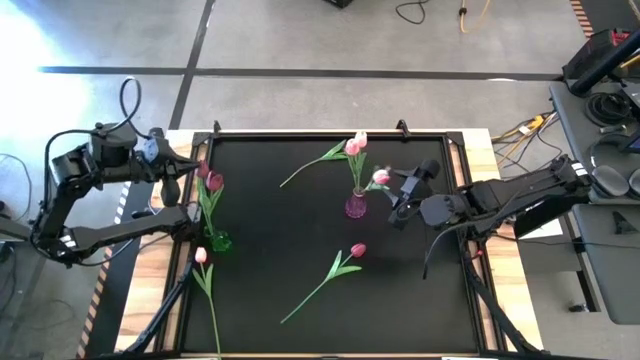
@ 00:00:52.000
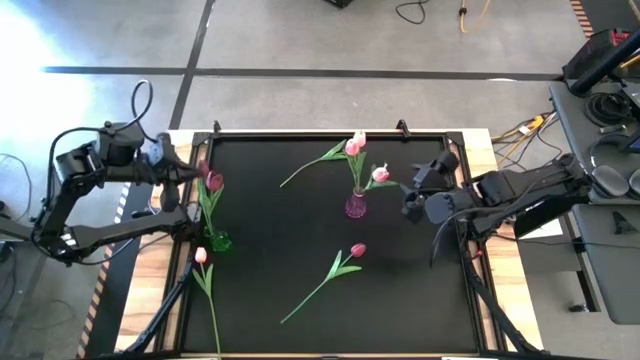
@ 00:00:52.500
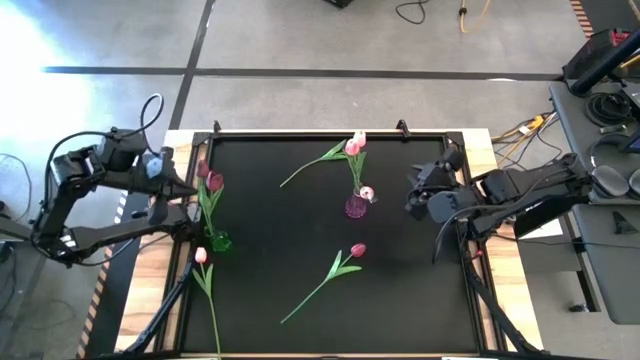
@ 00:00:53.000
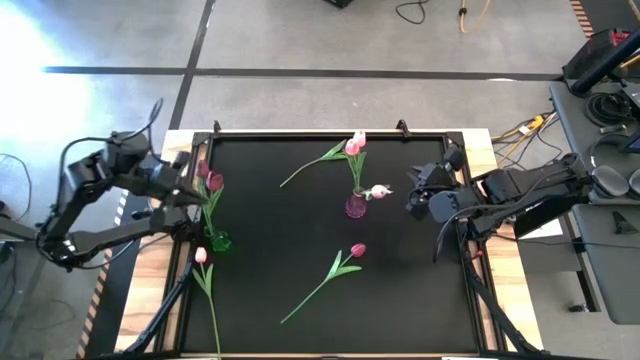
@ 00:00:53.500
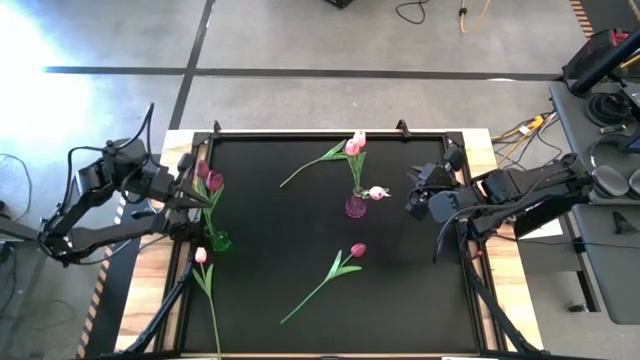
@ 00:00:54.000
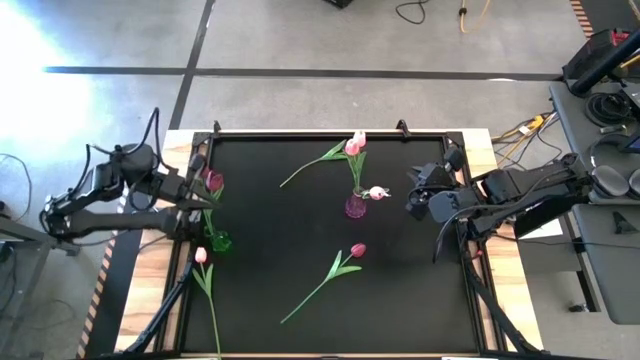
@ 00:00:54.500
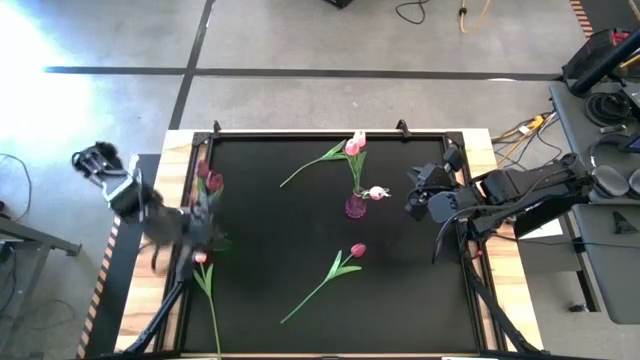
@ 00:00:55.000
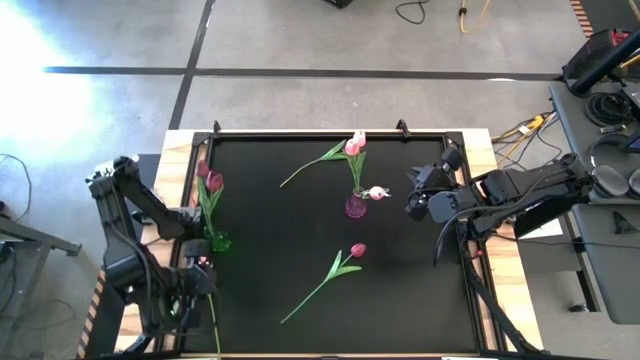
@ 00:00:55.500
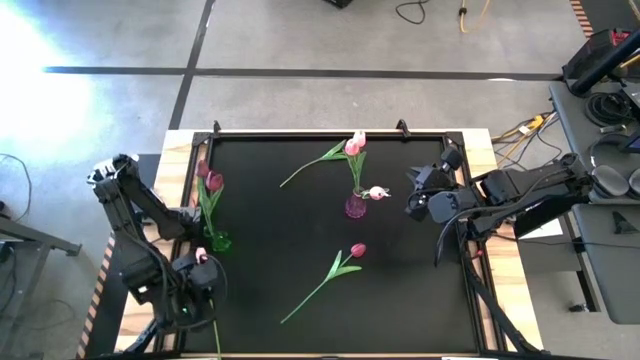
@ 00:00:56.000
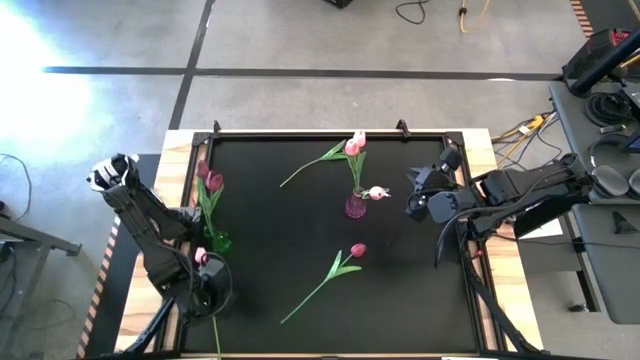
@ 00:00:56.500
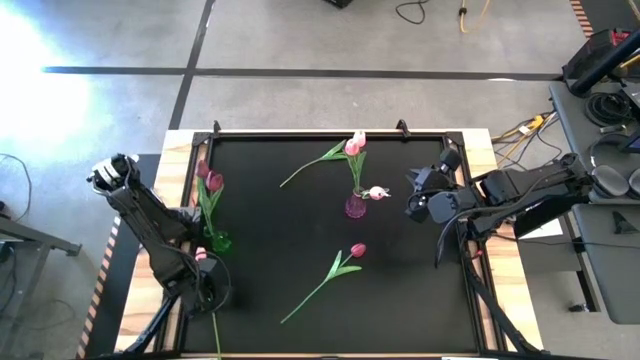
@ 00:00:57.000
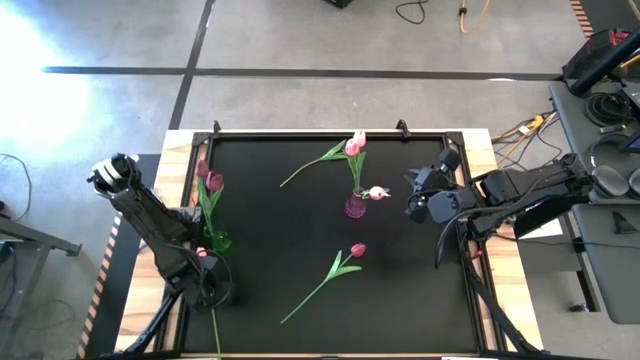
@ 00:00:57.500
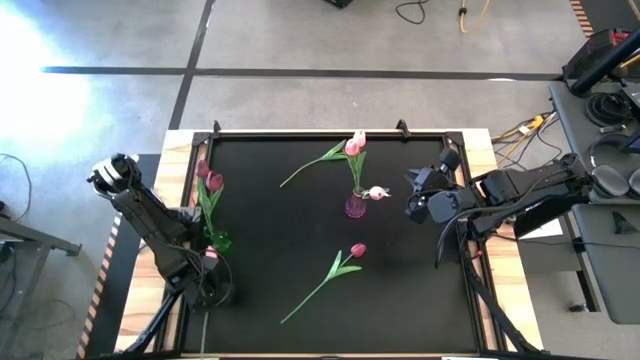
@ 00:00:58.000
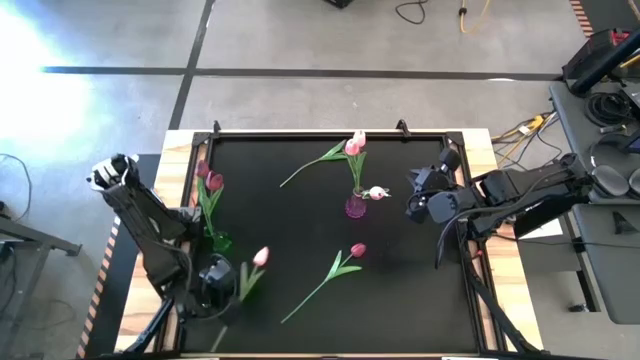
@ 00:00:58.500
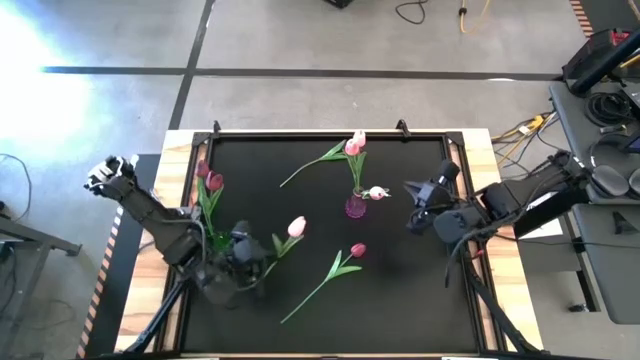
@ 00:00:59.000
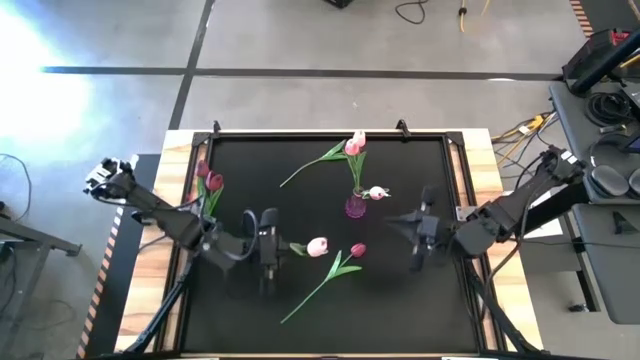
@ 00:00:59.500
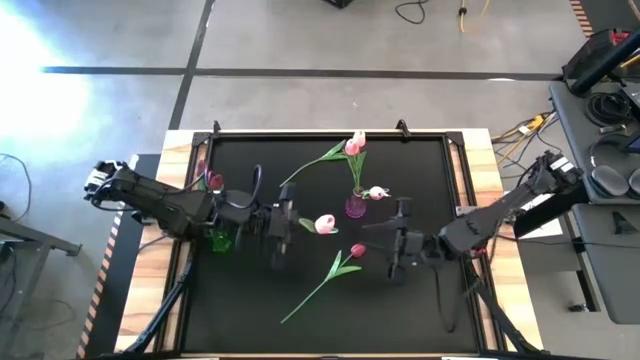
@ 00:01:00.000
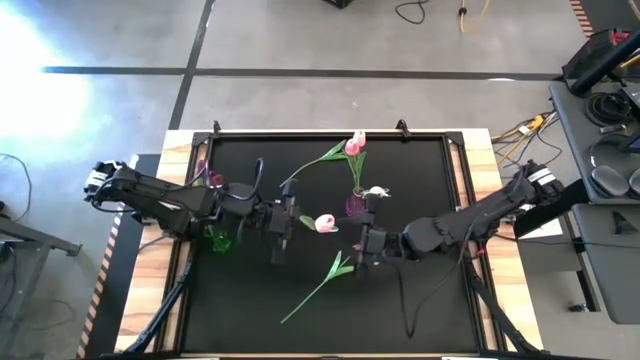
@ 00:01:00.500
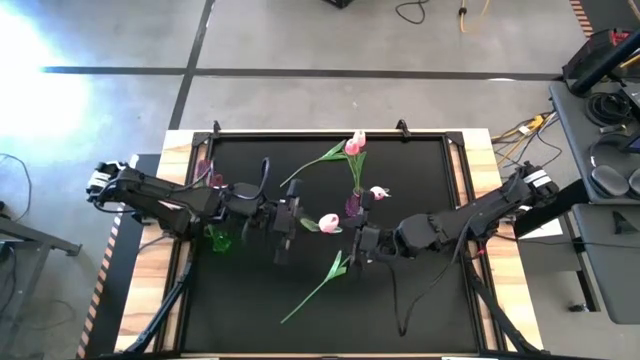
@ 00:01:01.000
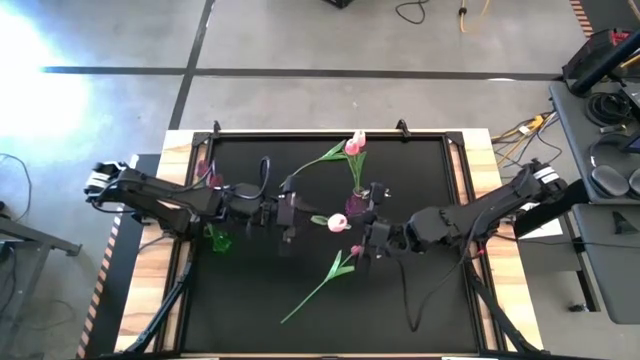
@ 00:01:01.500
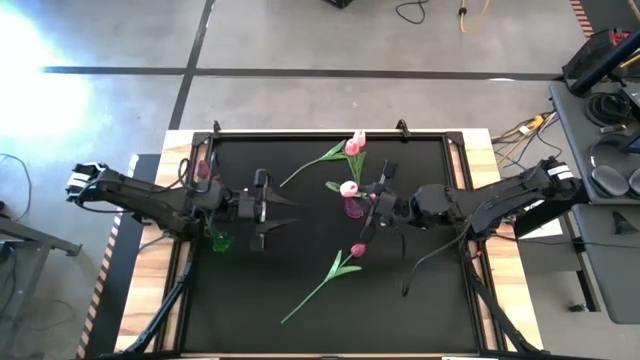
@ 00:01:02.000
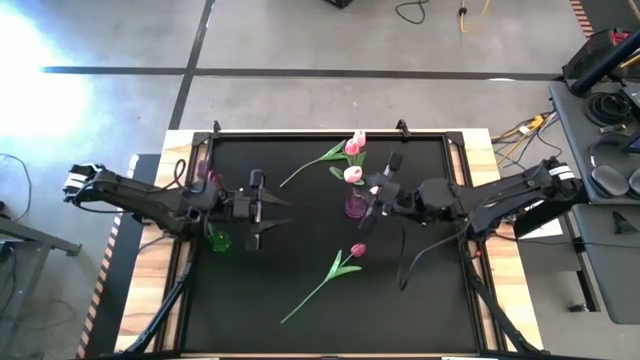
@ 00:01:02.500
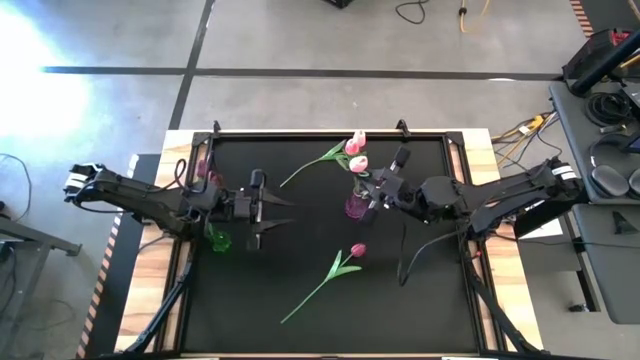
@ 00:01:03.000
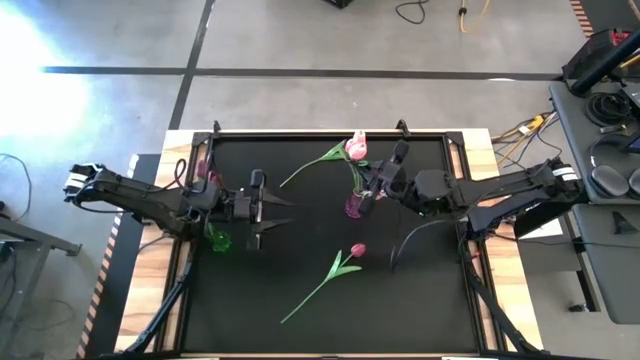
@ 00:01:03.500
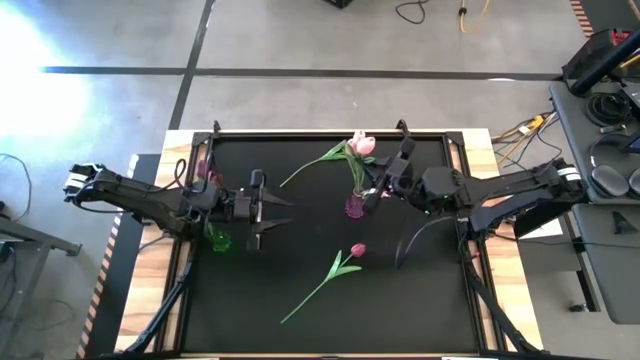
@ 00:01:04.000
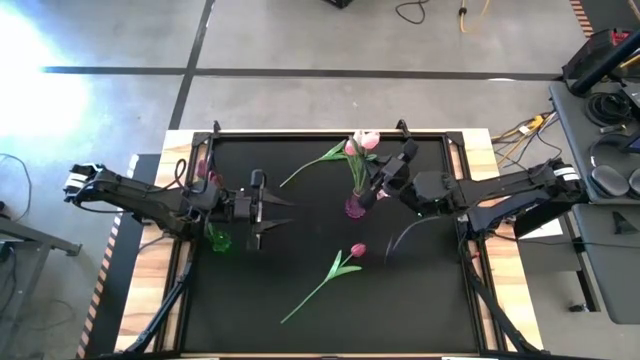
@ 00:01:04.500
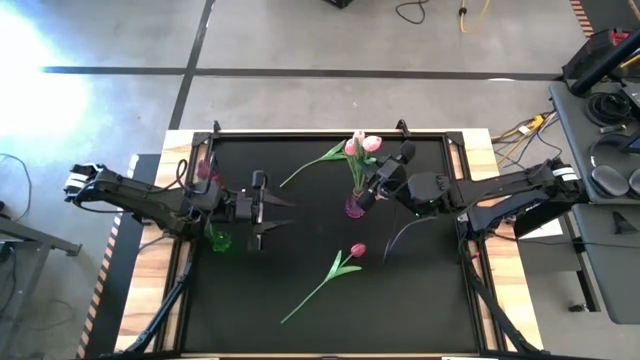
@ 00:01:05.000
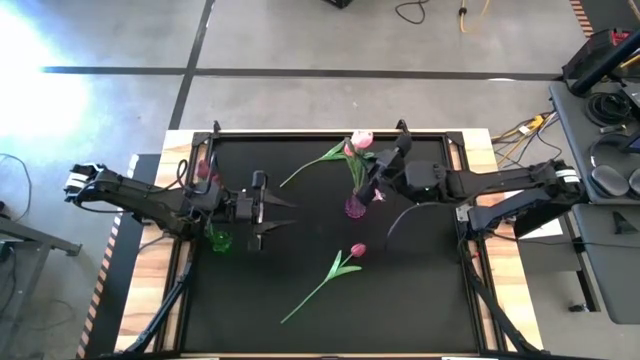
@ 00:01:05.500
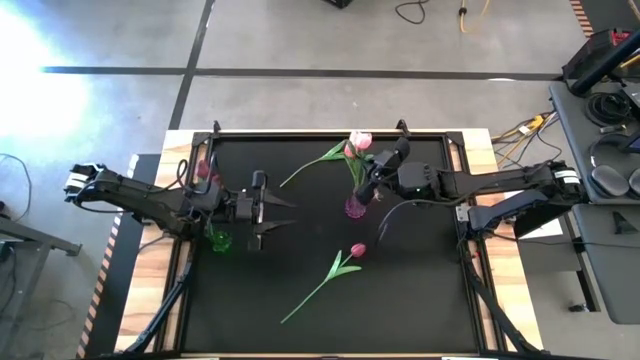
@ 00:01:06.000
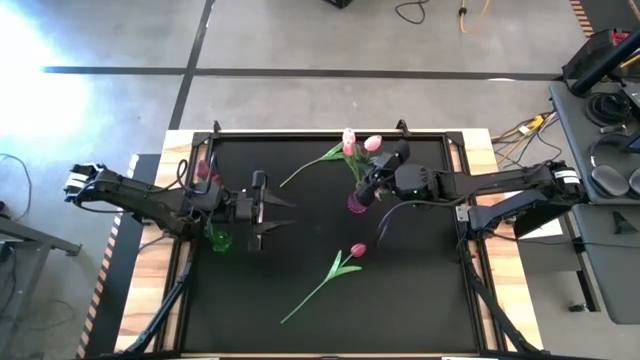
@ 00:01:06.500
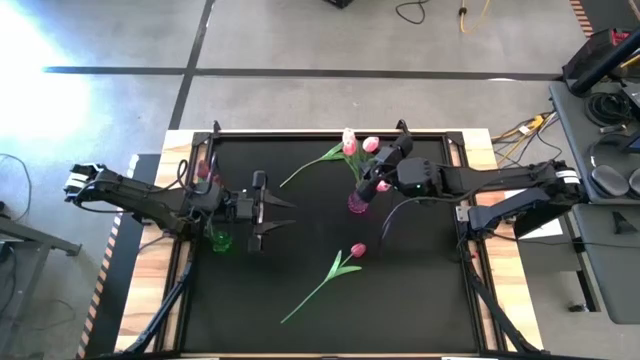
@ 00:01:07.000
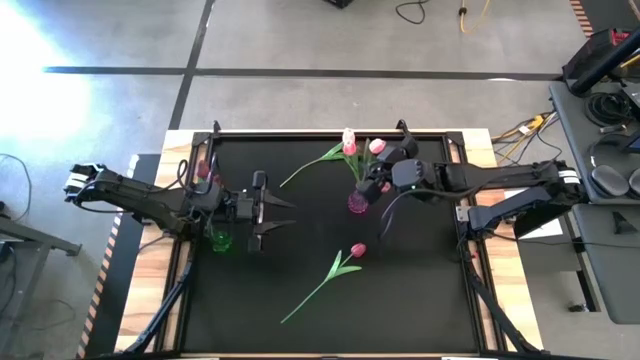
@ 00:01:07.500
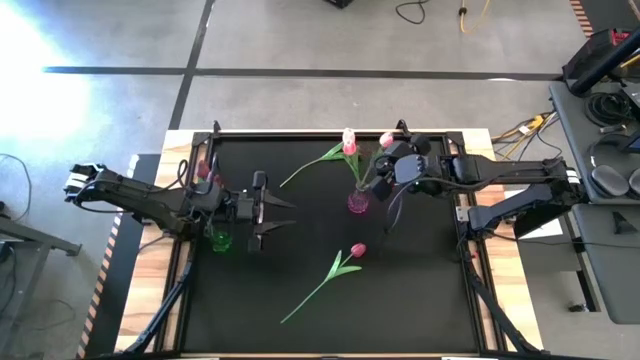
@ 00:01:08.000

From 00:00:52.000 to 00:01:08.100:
Task: Sort flowers into vase by color
Put the pink tulip into the purple vase
